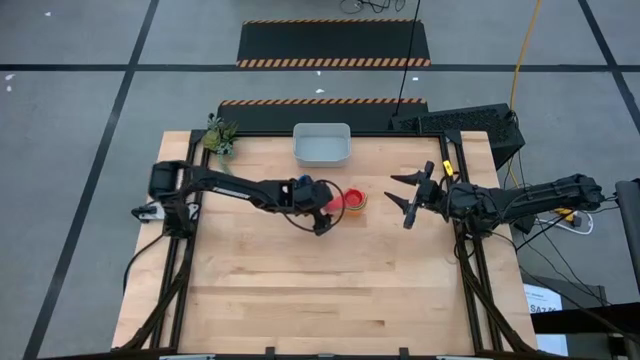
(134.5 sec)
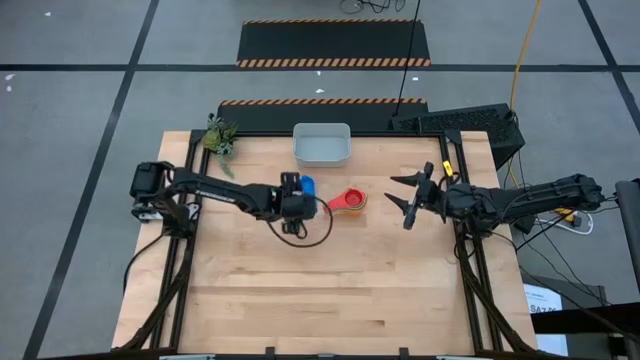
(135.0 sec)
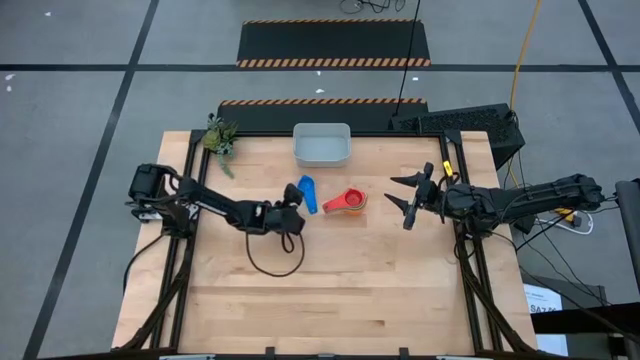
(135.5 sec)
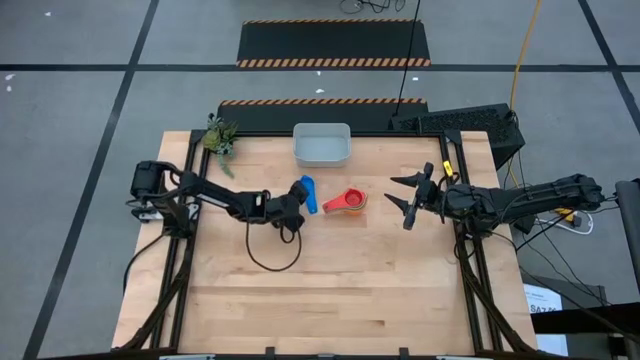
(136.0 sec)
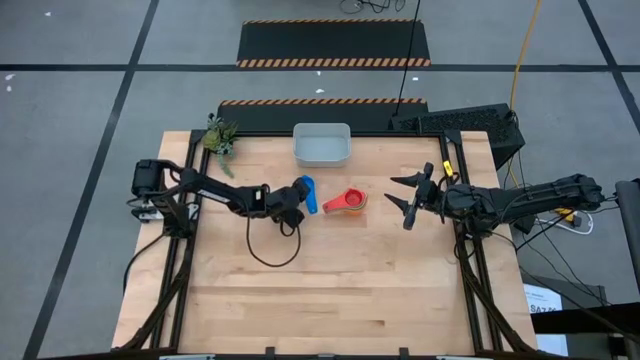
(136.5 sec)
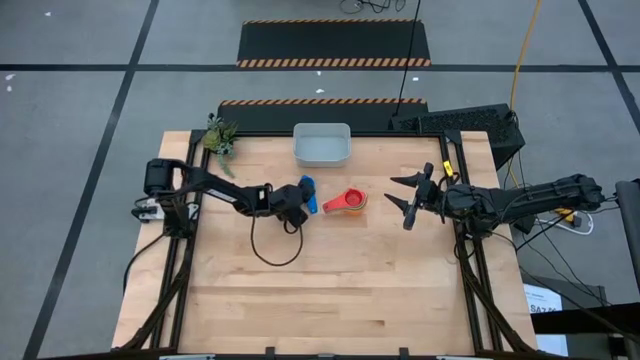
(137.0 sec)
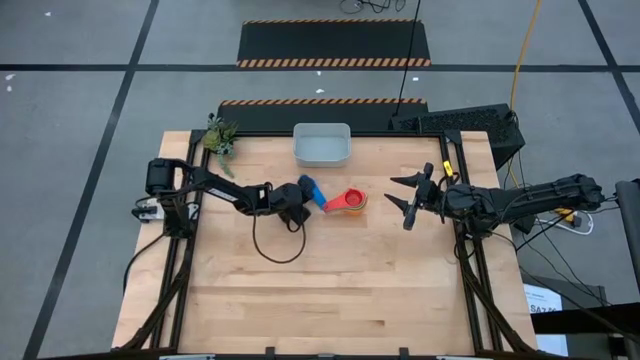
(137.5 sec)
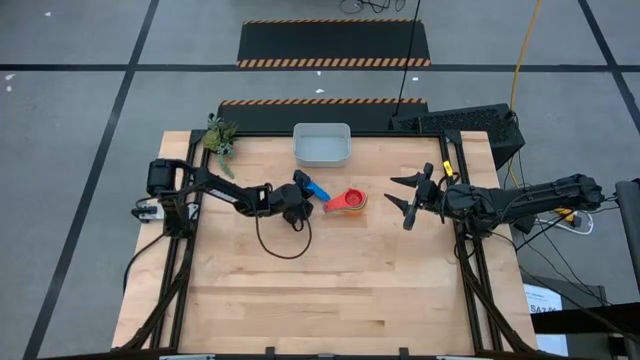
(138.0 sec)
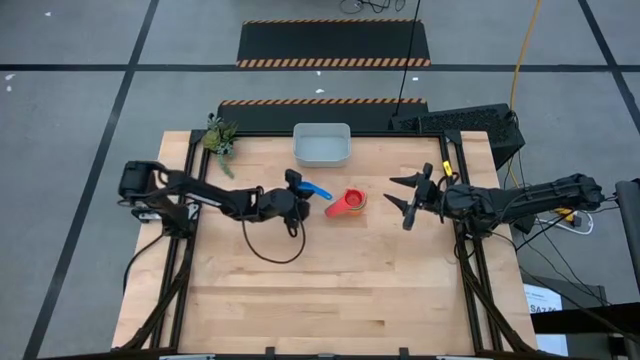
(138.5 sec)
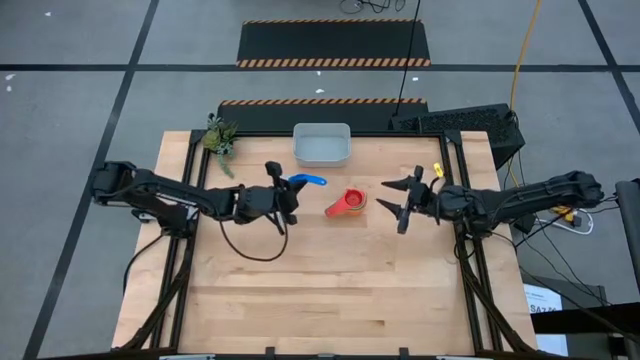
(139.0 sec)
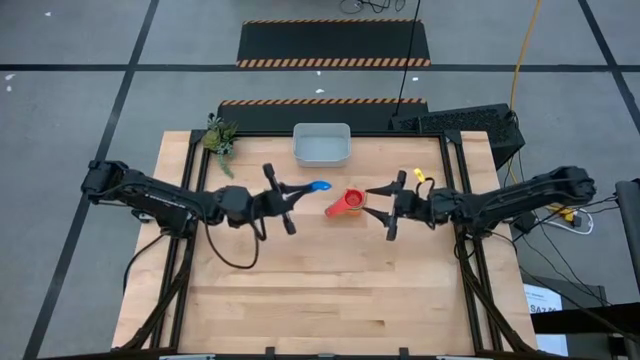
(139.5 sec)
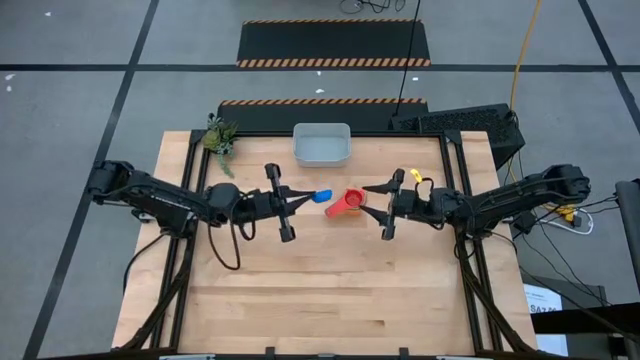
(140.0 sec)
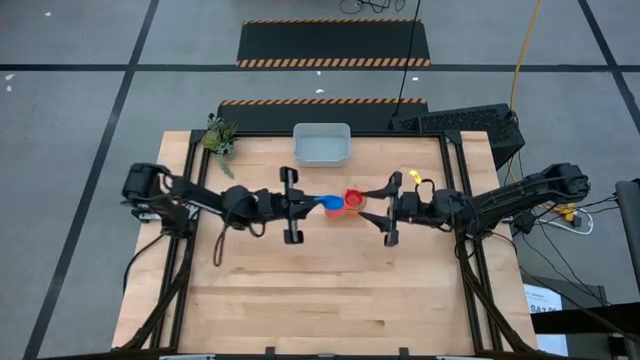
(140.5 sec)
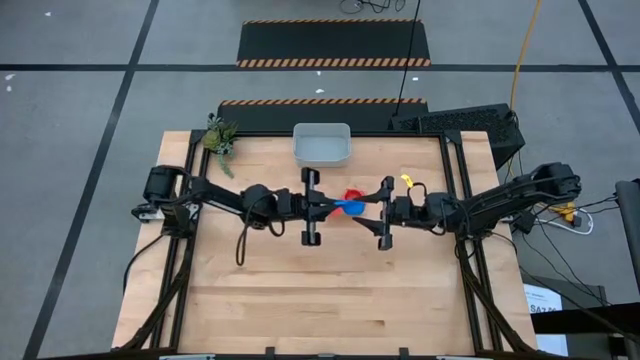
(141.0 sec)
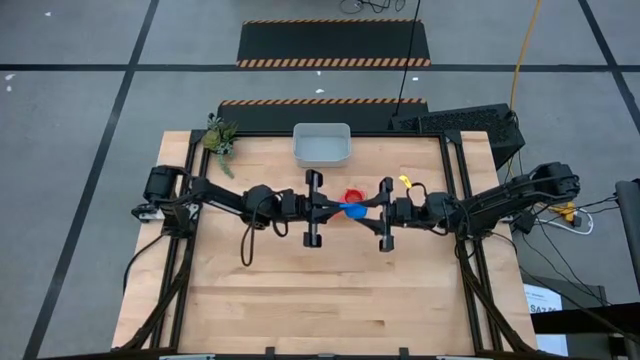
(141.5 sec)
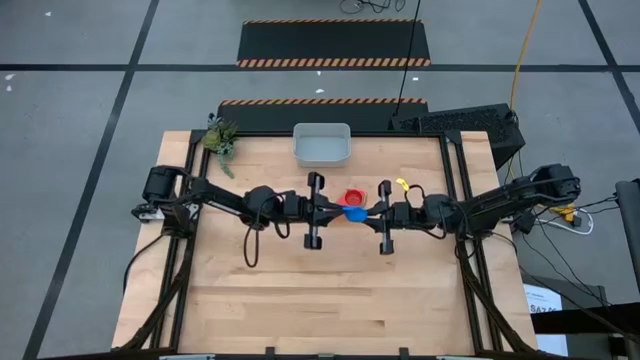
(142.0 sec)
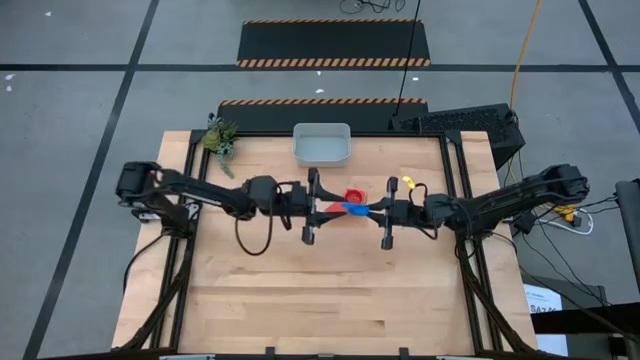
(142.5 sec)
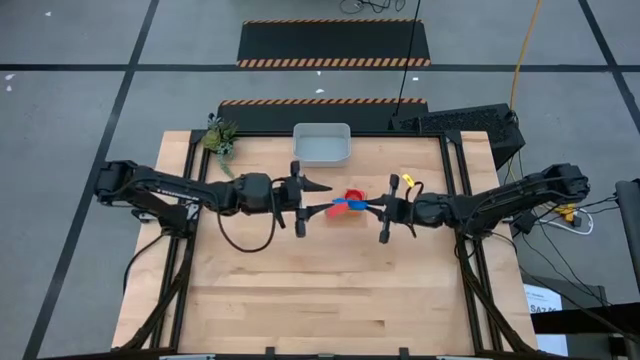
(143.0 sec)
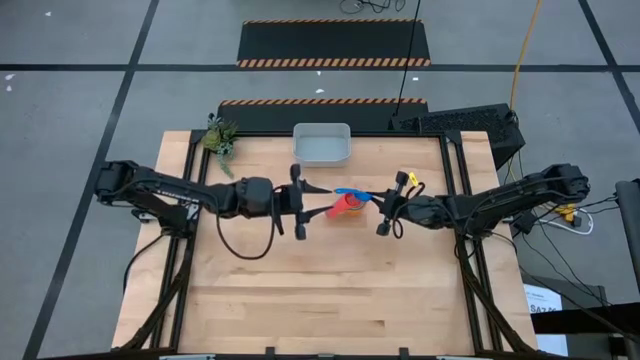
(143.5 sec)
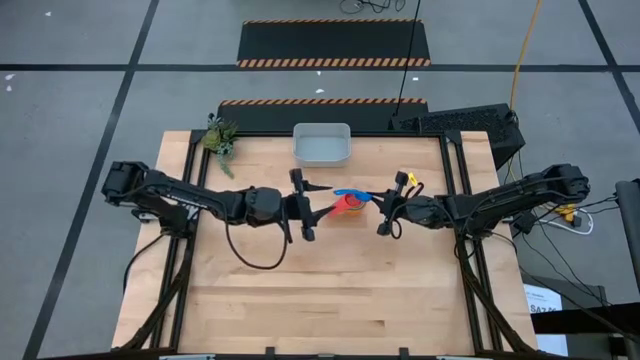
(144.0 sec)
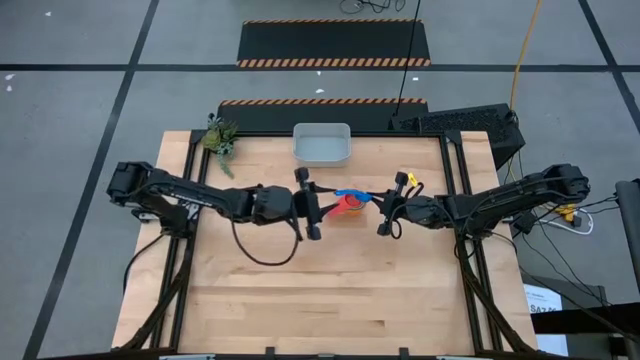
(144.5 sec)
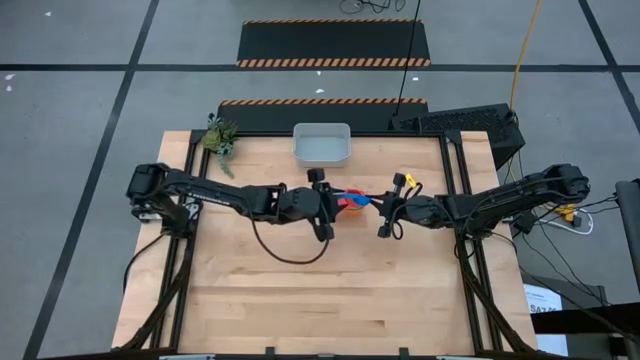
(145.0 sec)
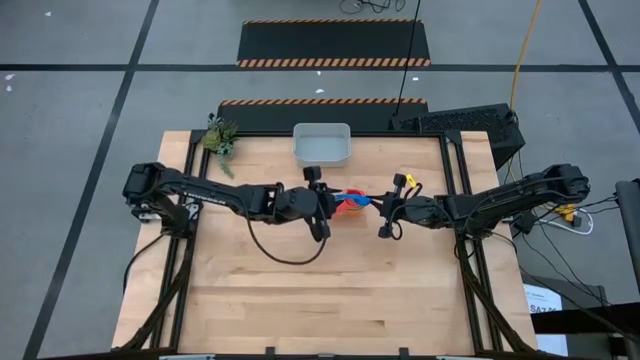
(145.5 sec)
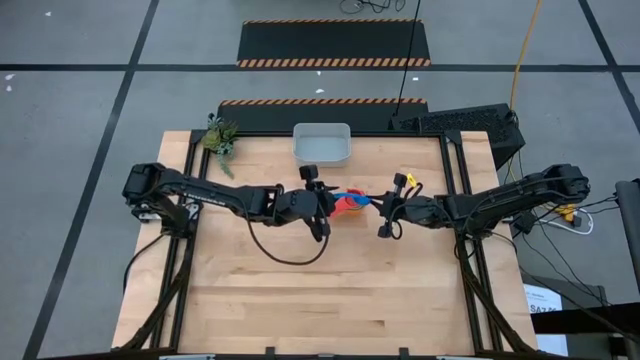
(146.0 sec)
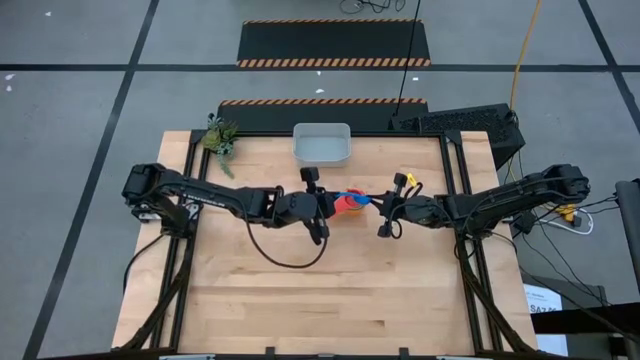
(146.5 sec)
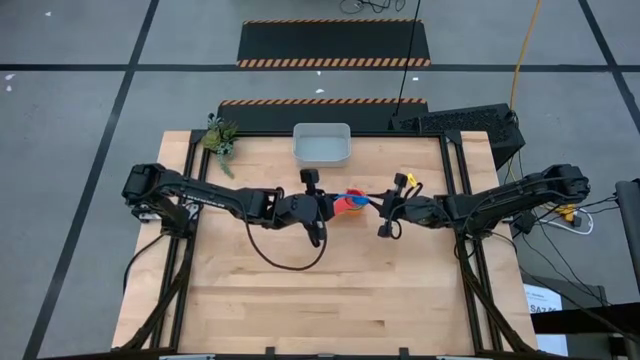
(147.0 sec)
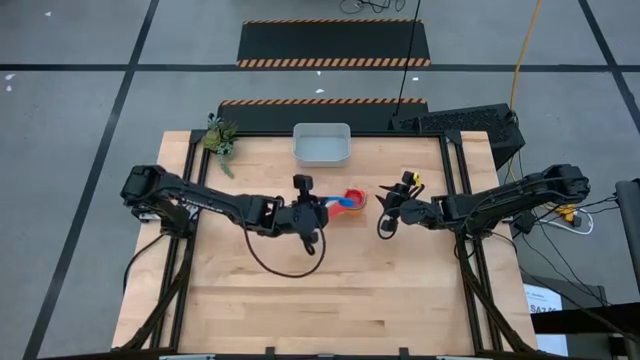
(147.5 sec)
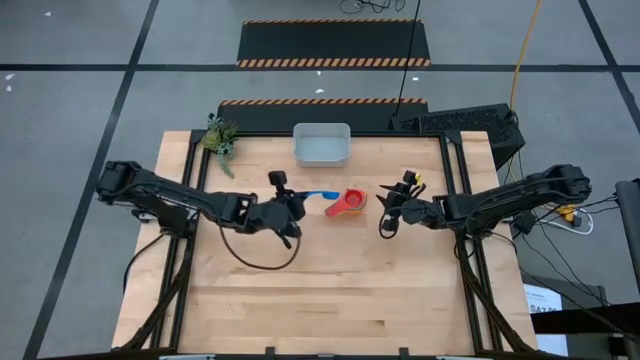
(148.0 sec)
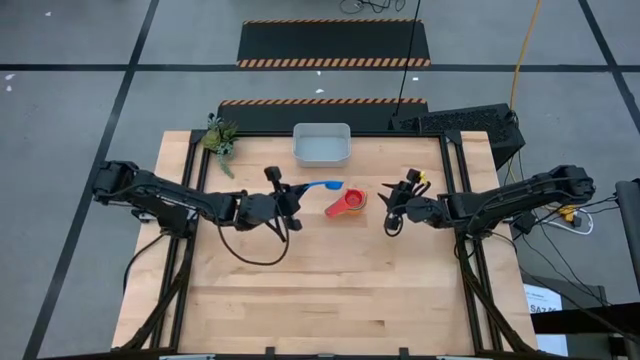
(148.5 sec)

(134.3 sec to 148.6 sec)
Task: Nest measuring cups in basket
Stack the blue measuring cup into the red measuring cup

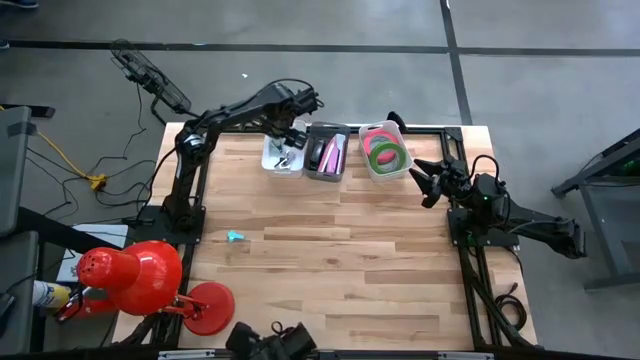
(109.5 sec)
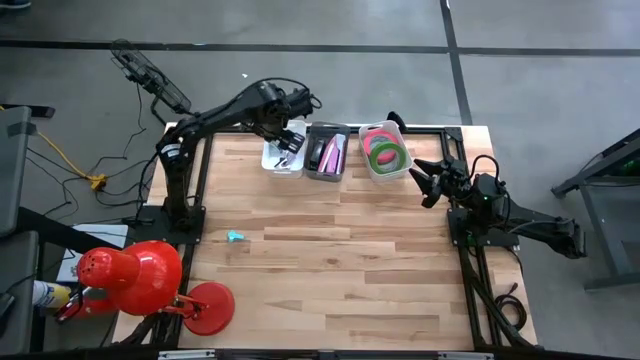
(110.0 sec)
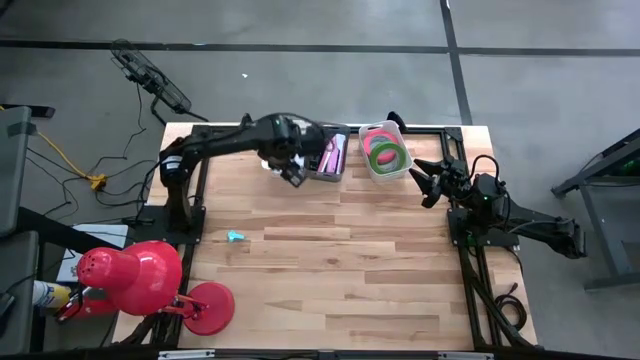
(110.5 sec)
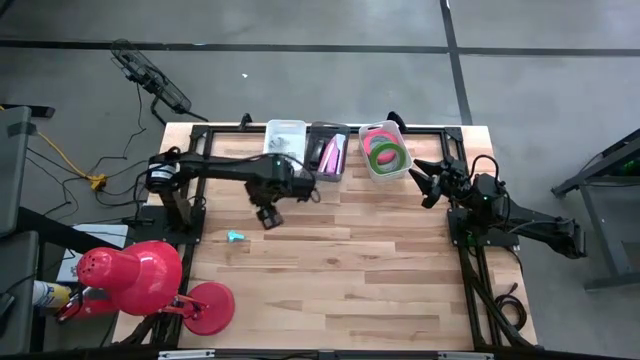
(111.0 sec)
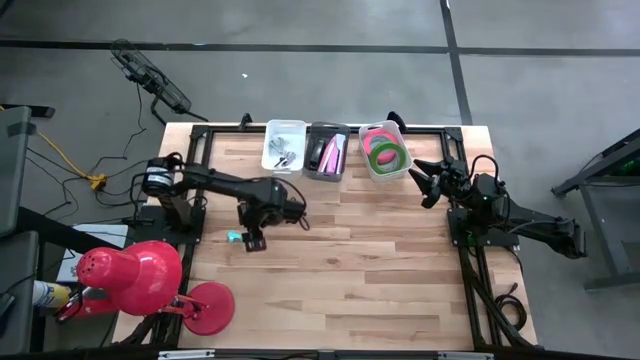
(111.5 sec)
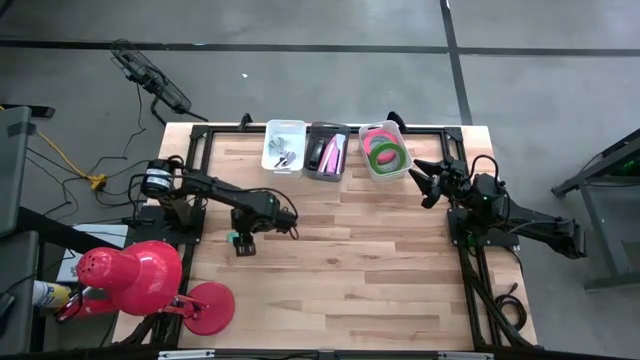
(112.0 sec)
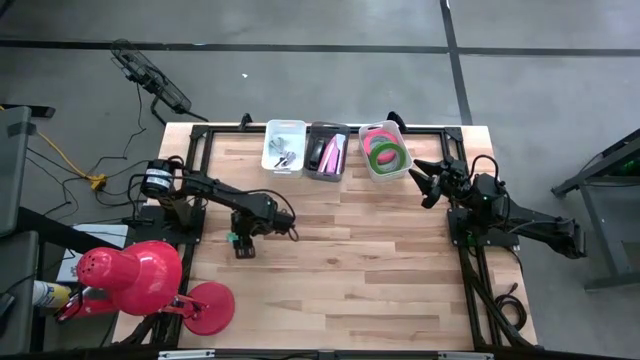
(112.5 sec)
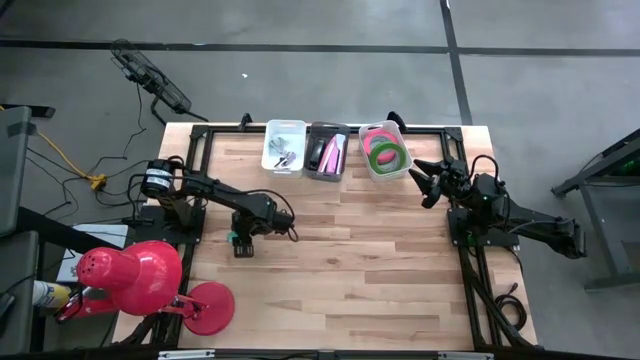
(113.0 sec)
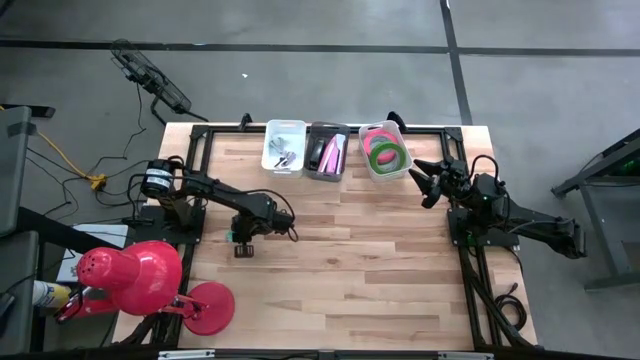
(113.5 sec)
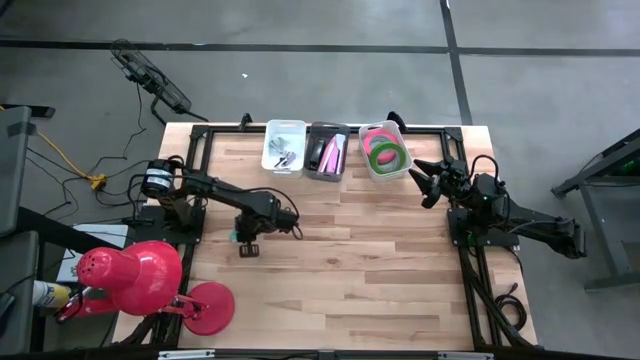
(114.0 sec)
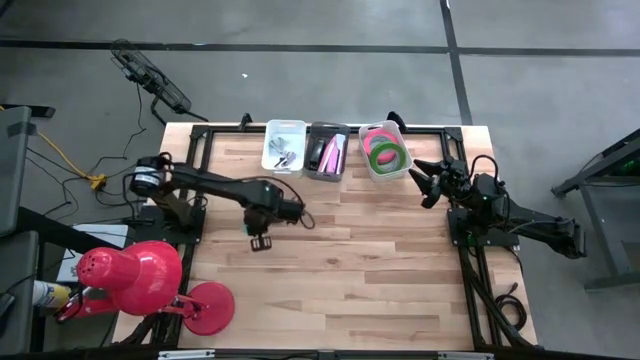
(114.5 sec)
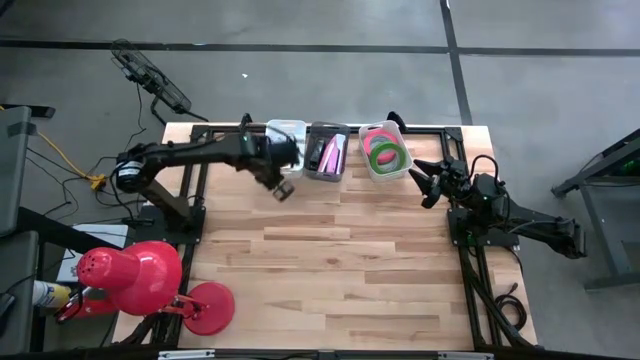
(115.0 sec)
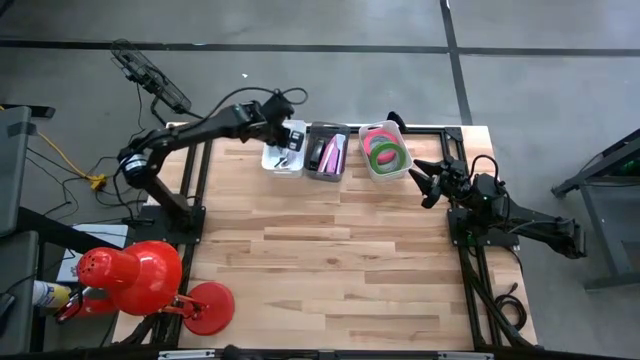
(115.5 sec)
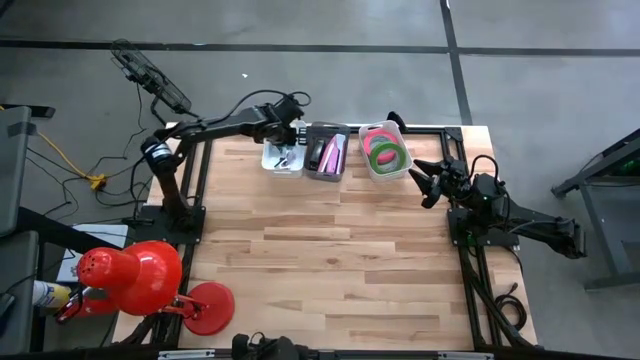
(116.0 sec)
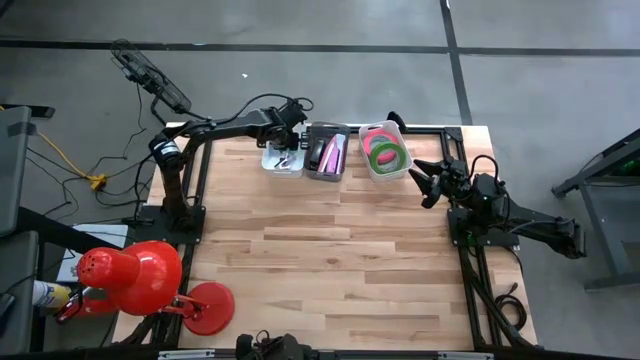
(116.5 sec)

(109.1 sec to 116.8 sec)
Task: Pick and place Stapler, Stapler remover, tape
Put the blue staple remover into the left white bin
